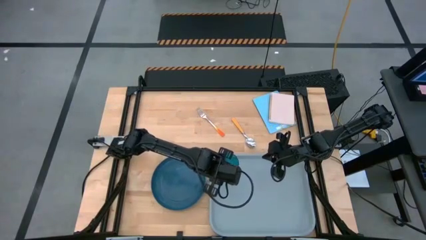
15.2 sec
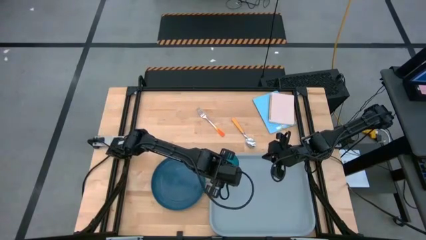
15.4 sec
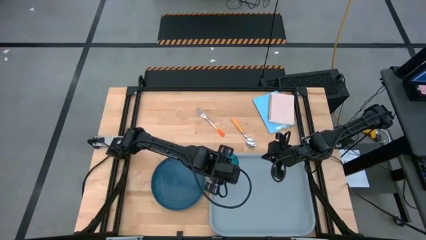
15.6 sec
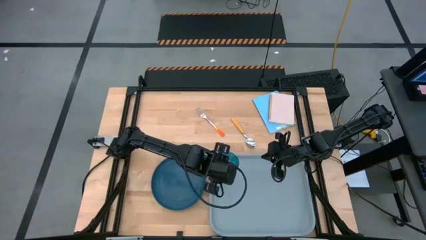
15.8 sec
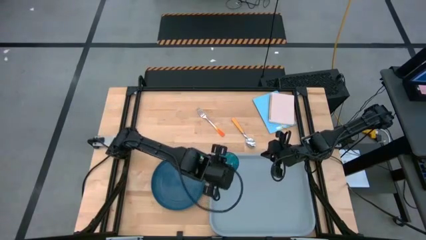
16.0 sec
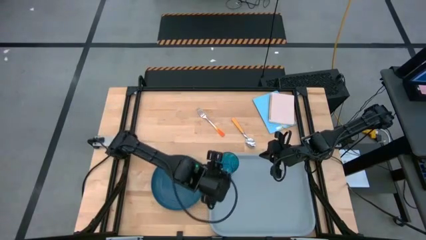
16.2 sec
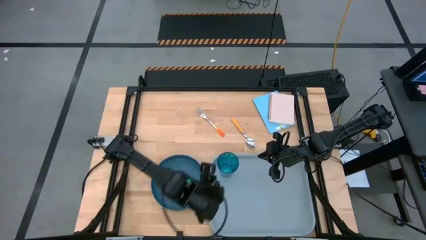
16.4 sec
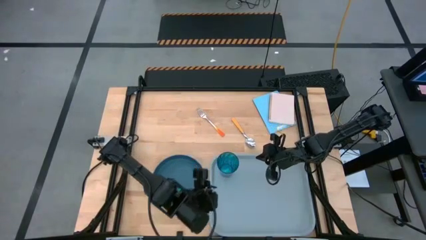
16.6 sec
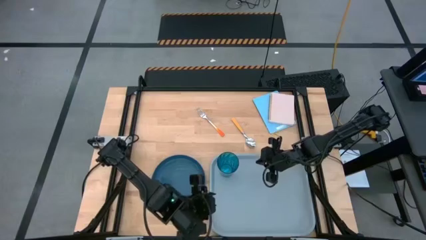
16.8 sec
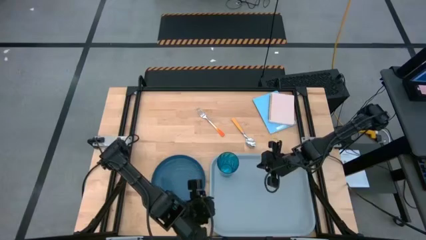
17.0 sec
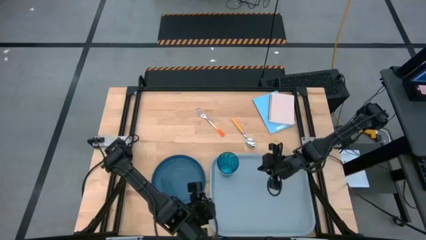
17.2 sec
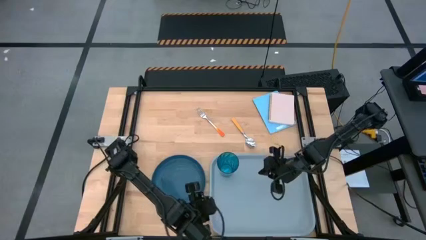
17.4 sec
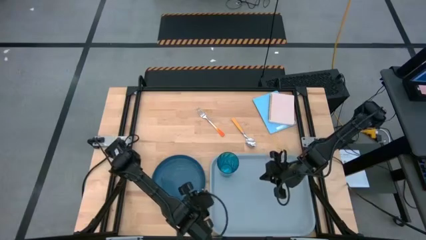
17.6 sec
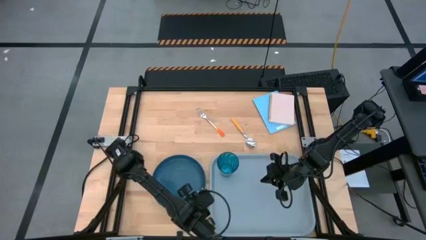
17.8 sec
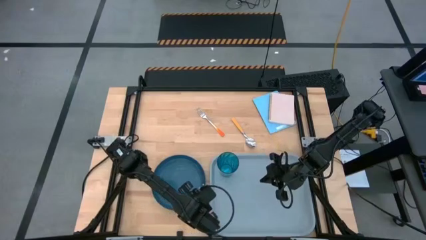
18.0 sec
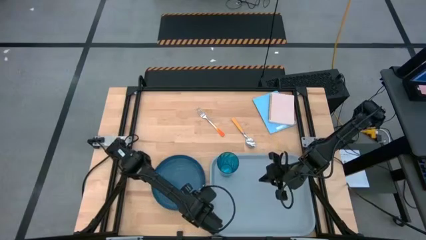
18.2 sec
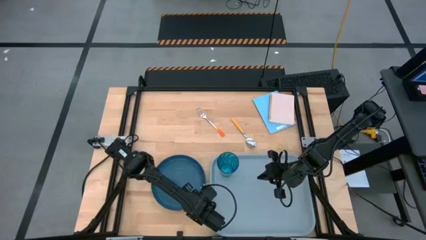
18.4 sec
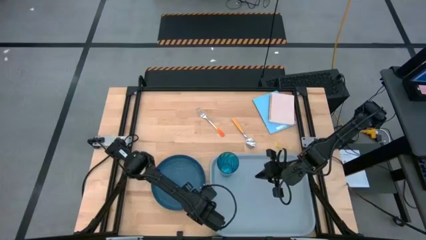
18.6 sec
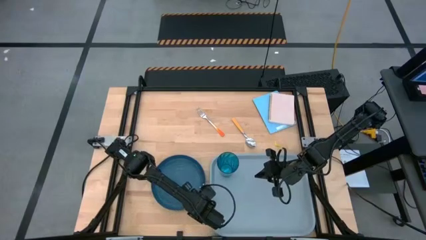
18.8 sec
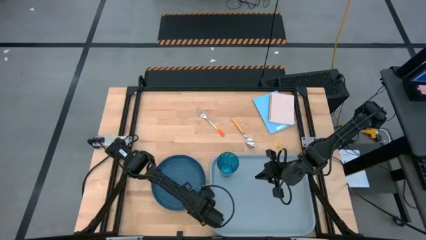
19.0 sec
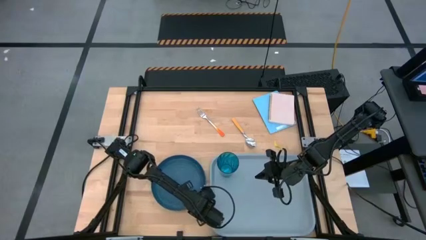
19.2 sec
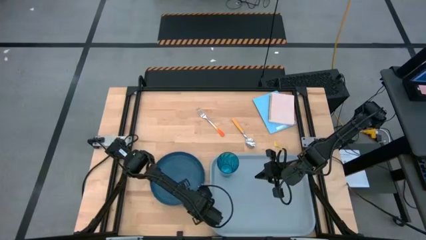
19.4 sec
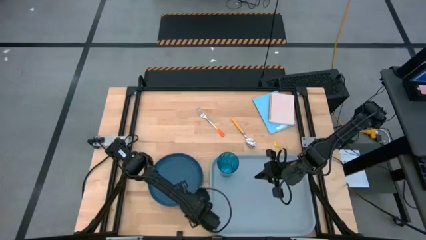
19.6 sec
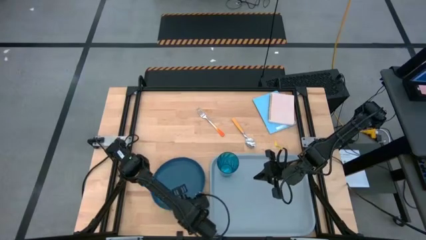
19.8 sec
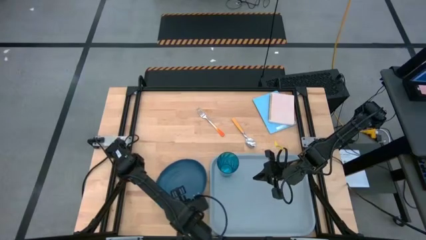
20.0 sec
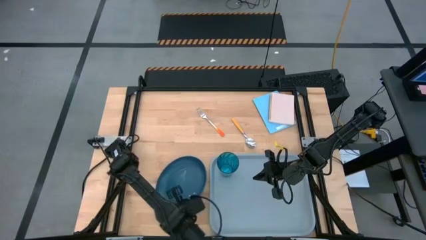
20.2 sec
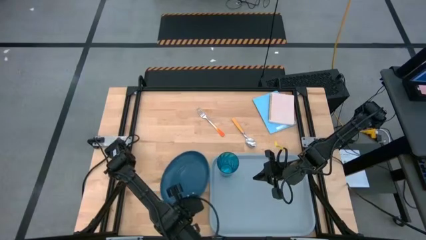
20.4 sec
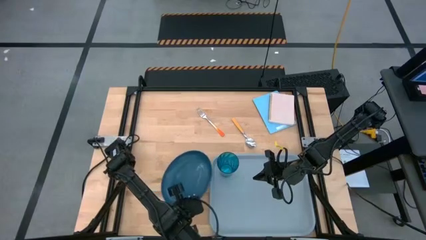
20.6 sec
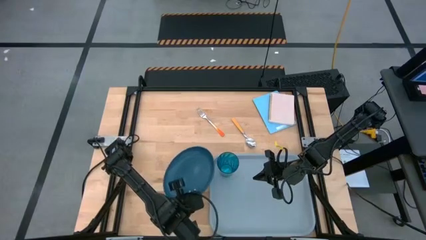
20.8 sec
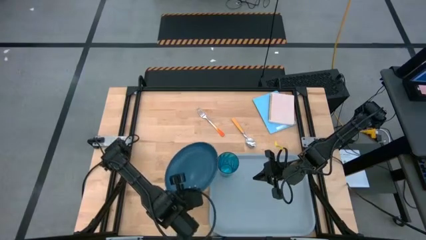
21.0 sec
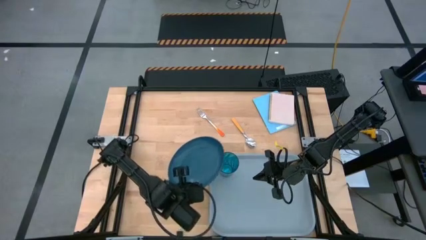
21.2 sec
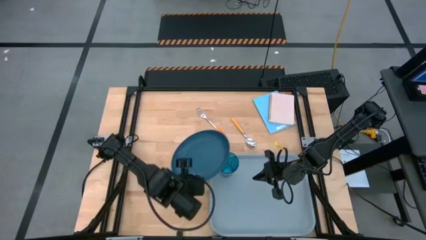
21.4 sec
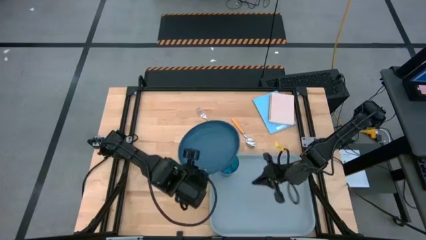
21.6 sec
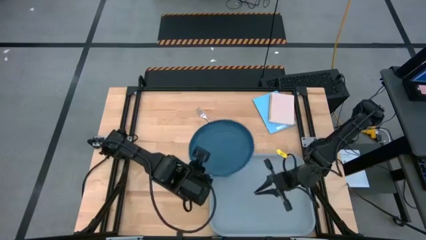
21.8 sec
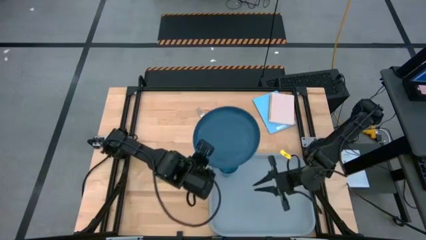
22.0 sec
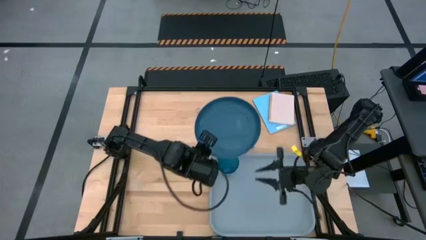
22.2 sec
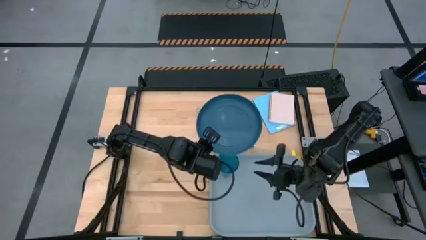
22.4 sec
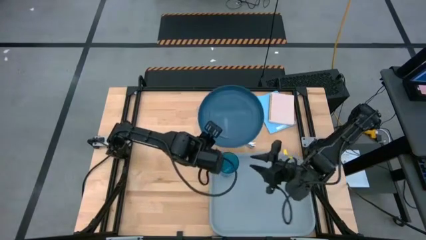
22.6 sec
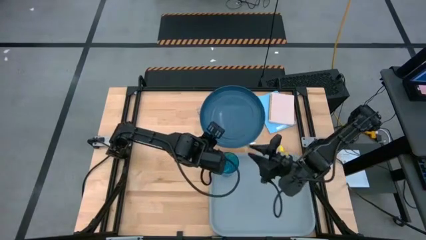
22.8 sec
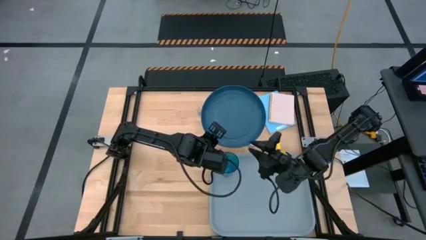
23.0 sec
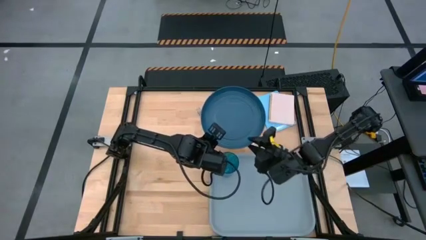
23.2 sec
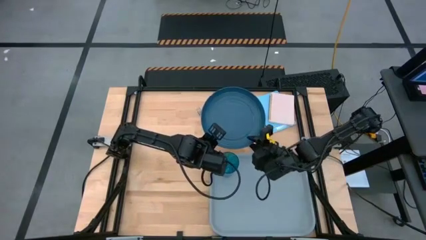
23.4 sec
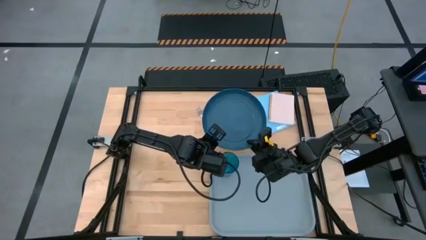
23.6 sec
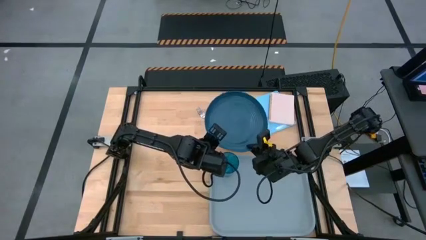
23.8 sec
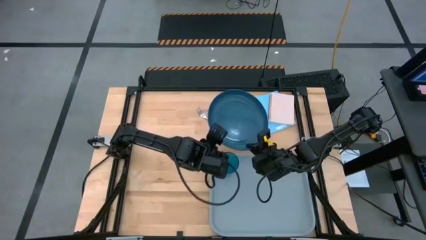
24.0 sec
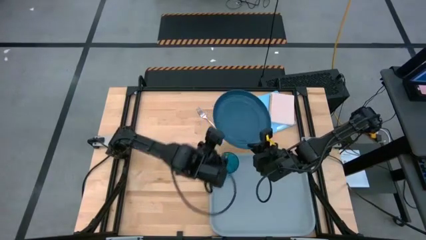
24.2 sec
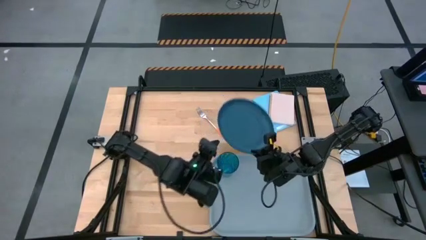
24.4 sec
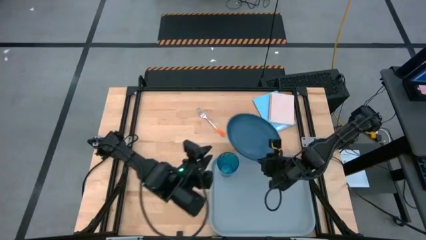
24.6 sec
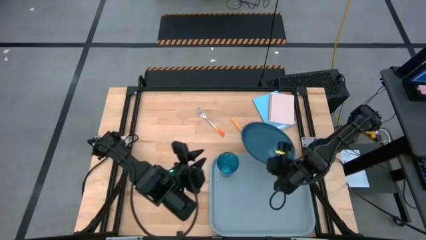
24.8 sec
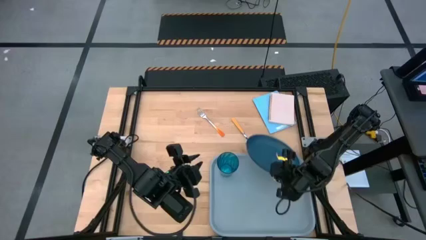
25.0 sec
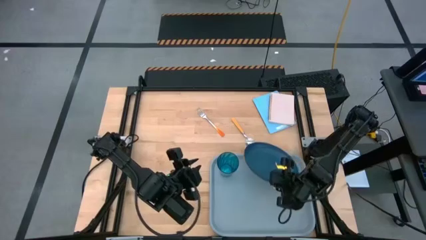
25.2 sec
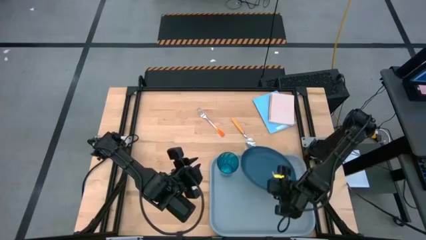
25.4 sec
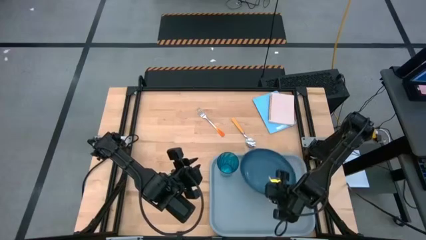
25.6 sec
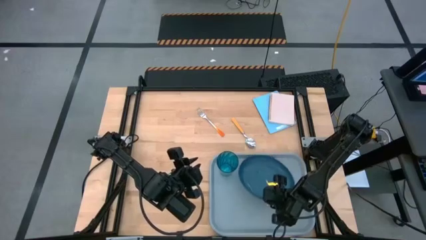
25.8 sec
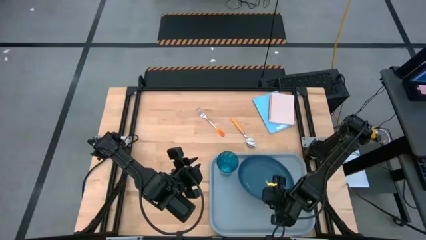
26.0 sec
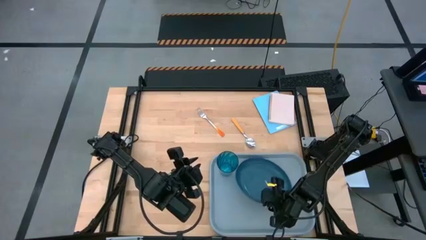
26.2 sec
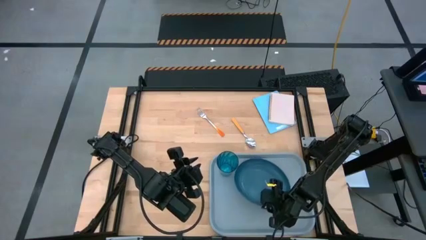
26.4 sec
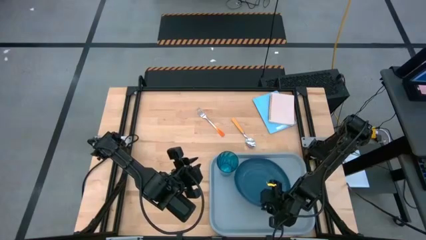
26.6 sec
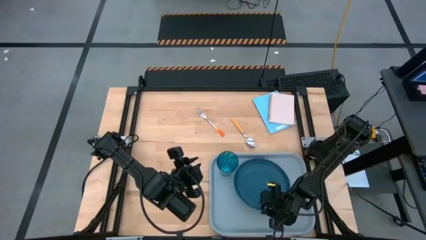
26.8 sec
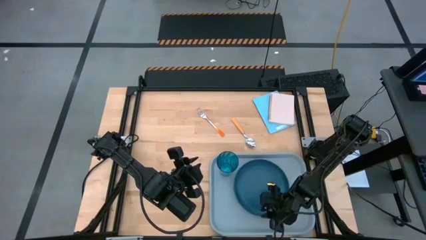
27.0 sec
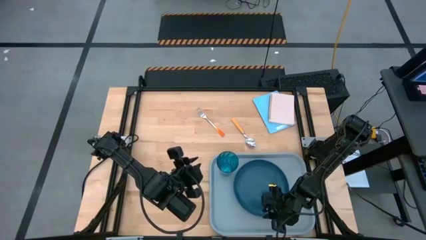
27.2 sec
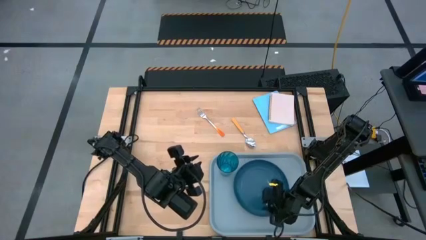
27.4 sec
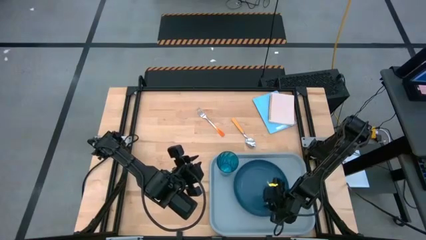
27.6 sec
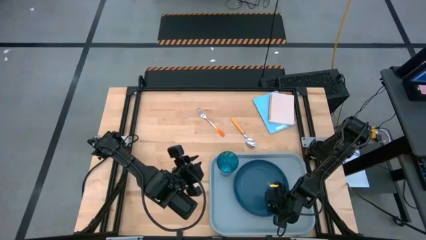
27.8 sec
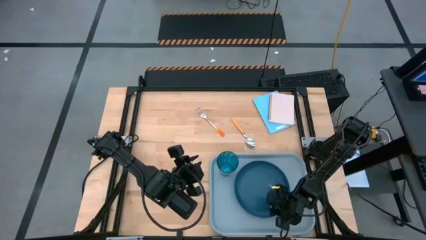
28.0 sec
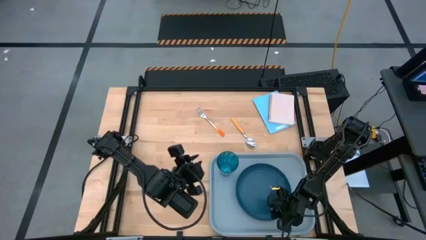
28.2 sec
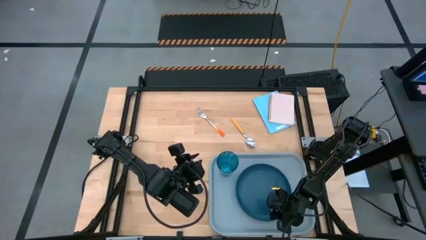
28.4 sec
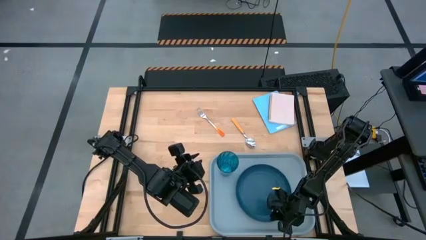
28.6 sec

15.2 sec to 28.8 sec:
Task: Pick and place plate/cup/fork/spoon on tray
Put the blue plate on the center of the gray tray

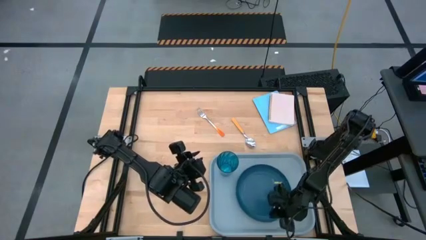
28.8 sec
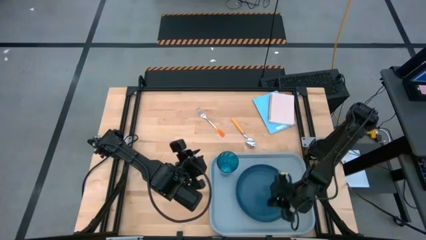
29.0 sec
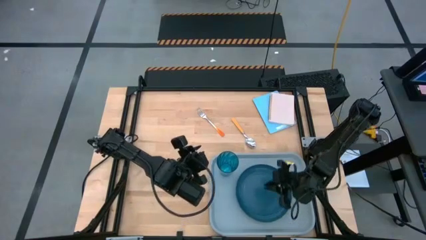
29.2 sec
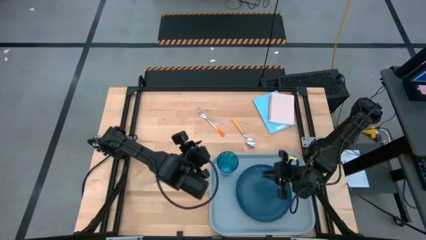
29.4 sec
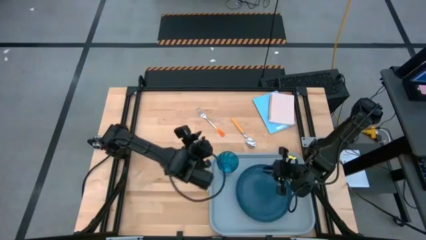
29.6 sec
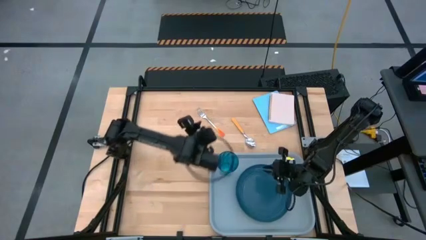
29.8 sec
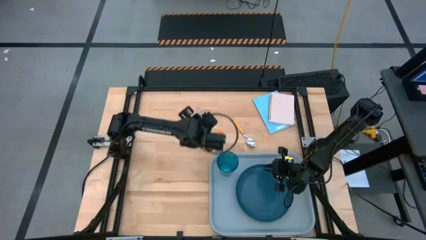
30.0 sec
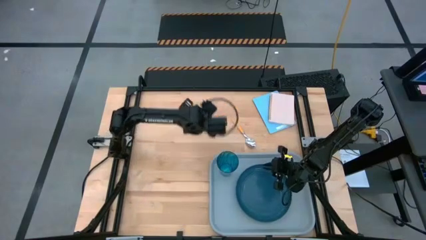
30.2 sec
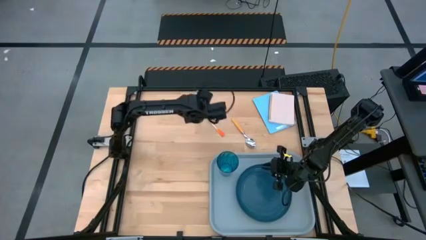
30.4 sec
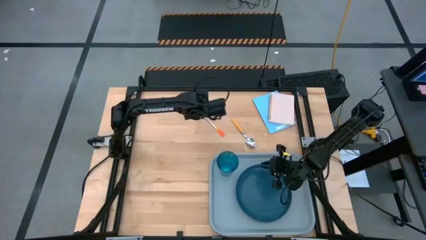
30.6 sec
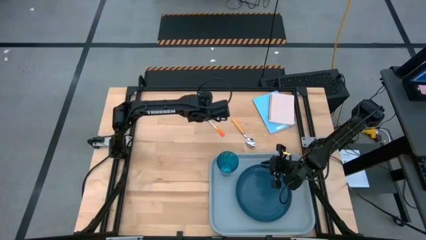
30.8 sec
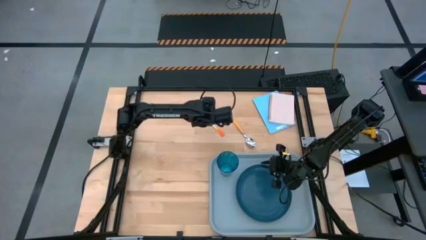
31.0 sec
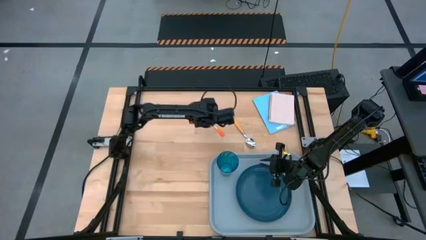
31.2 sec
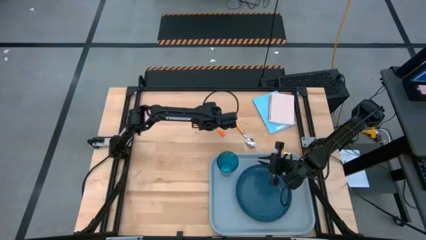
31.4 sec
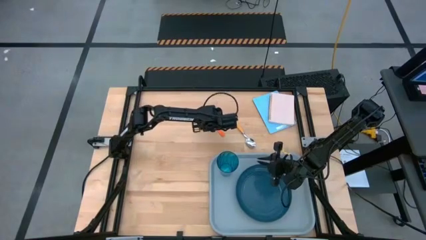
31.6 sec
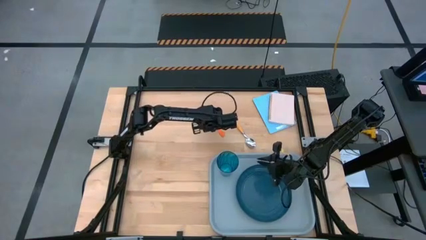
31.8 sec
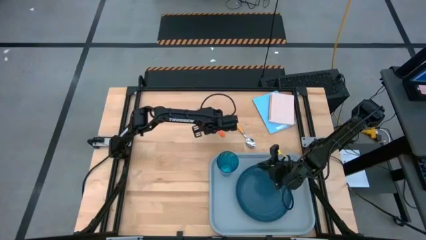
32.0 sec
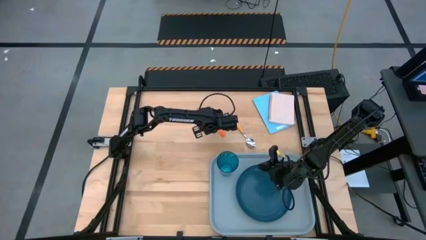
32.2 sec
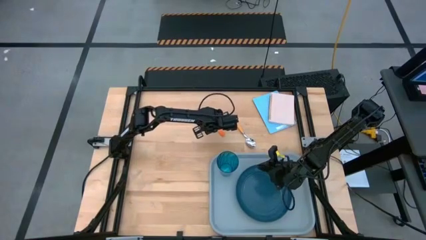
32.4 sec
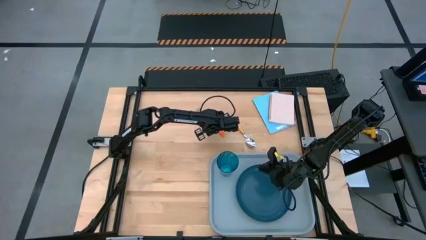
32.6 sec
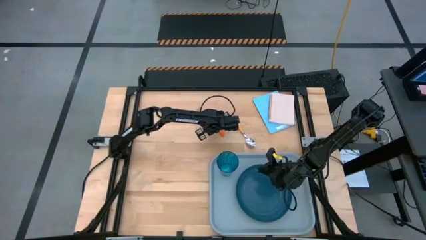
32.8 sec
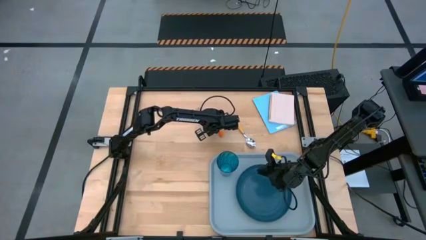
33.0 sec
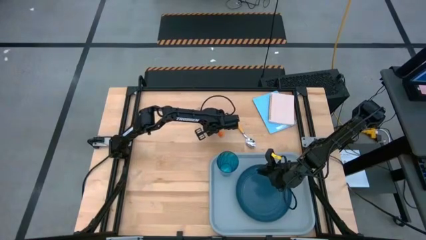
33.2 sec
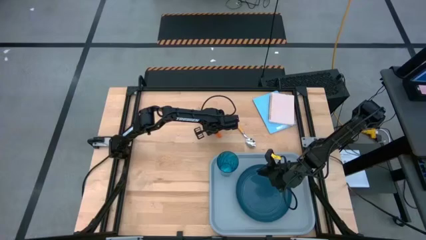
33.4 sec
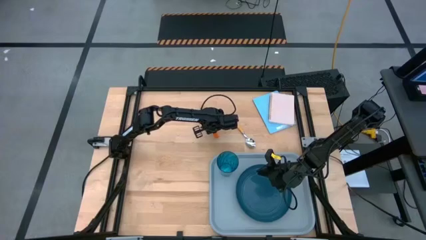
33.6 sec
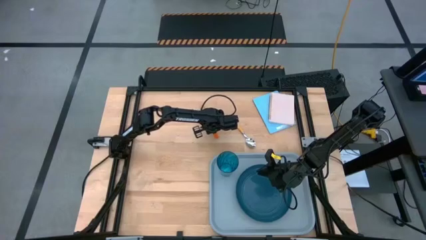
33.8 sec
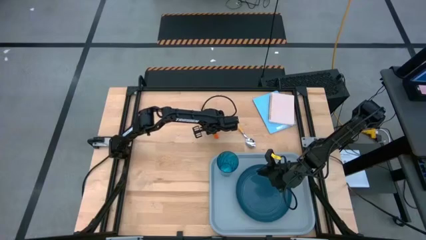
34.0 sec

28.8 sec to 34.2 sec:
Put the orange fork on the gray tray to the left of the blue plate
